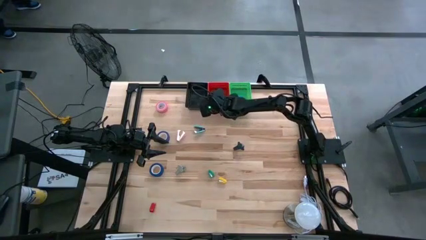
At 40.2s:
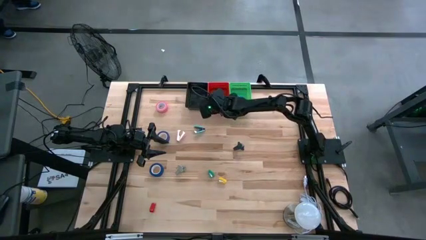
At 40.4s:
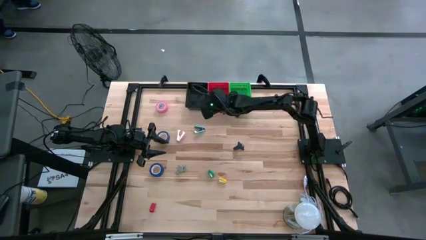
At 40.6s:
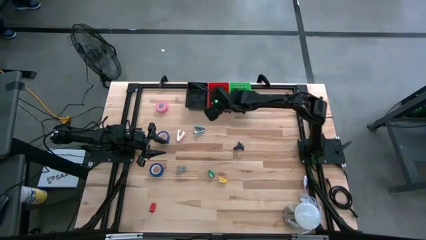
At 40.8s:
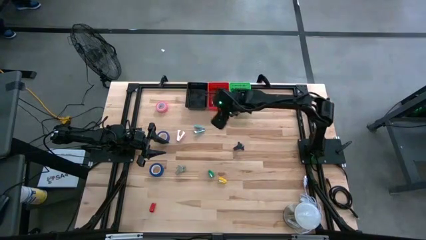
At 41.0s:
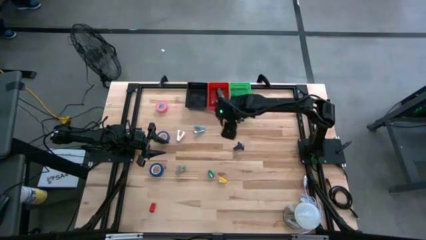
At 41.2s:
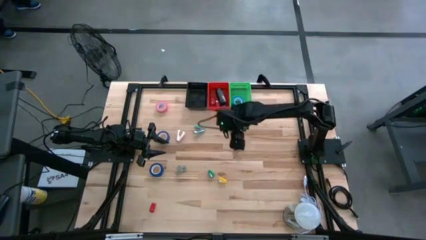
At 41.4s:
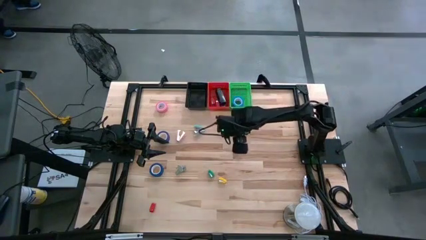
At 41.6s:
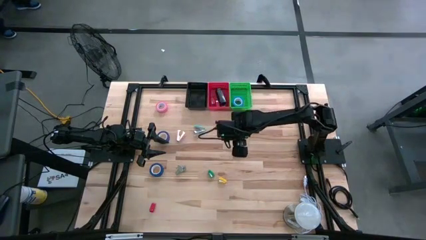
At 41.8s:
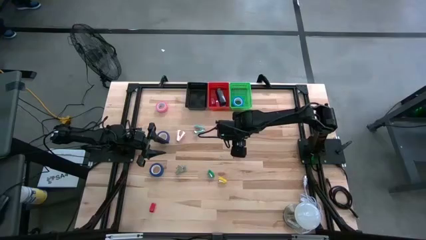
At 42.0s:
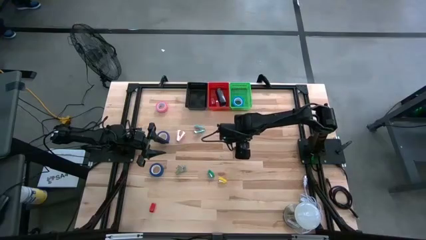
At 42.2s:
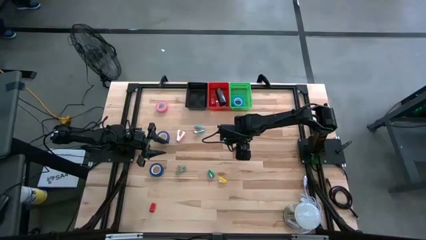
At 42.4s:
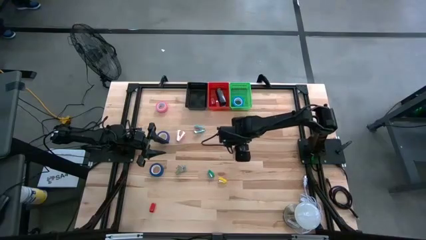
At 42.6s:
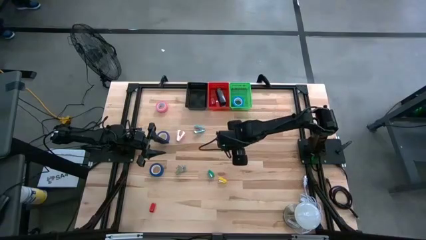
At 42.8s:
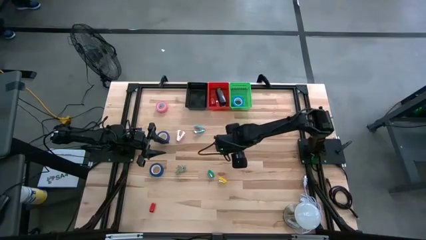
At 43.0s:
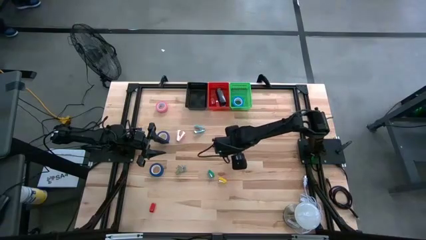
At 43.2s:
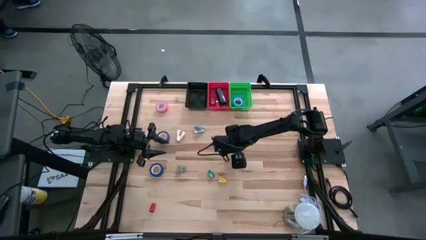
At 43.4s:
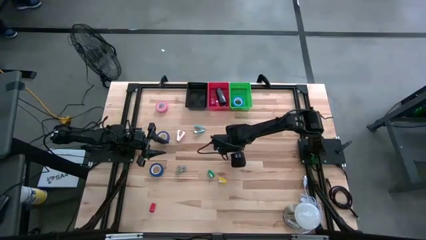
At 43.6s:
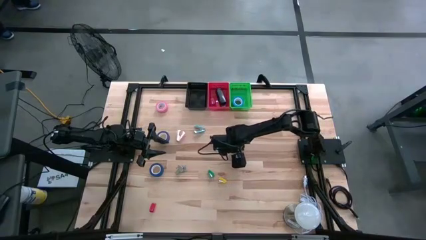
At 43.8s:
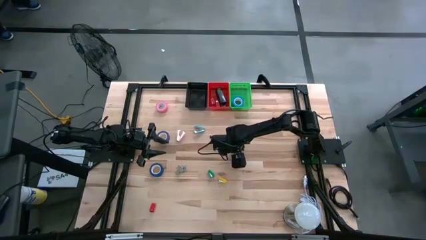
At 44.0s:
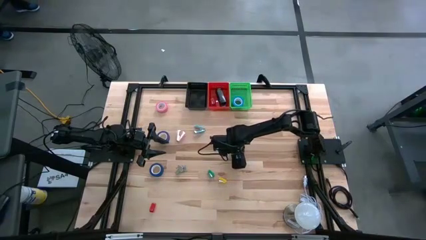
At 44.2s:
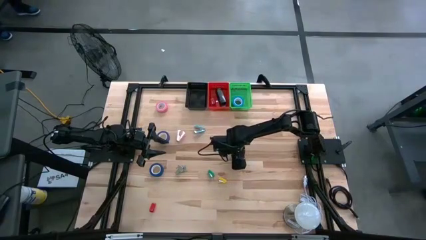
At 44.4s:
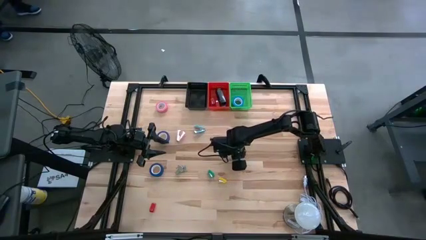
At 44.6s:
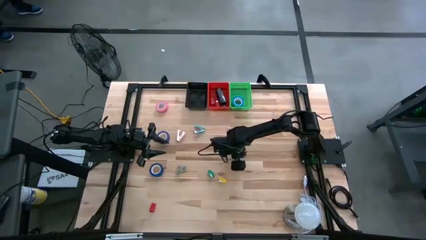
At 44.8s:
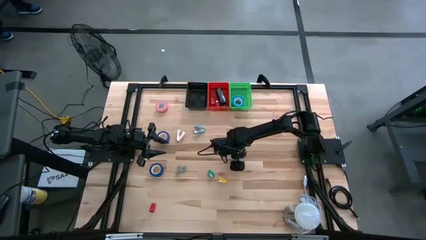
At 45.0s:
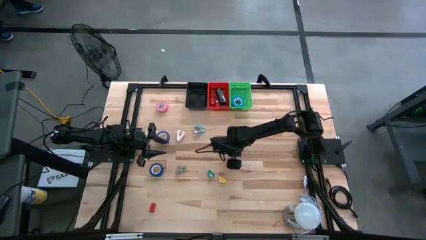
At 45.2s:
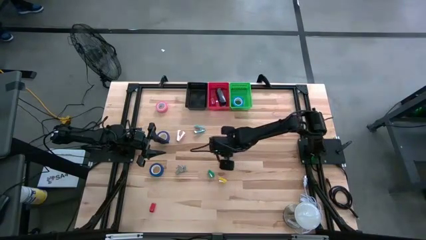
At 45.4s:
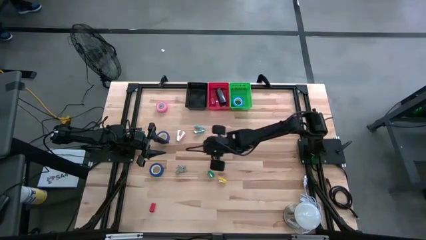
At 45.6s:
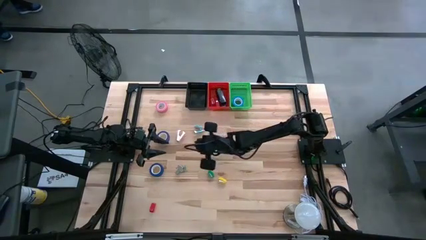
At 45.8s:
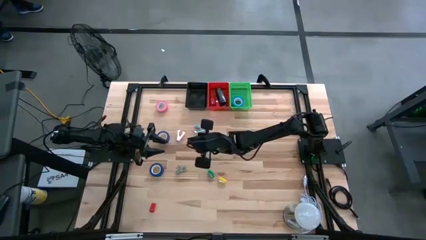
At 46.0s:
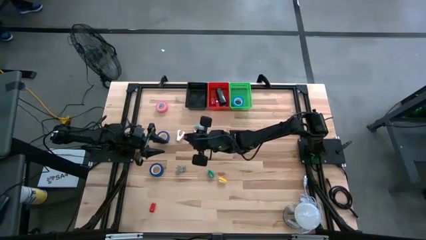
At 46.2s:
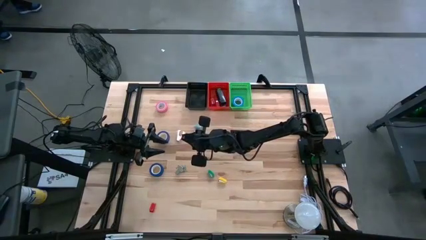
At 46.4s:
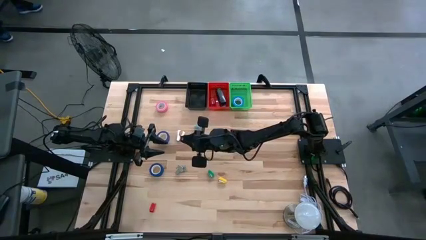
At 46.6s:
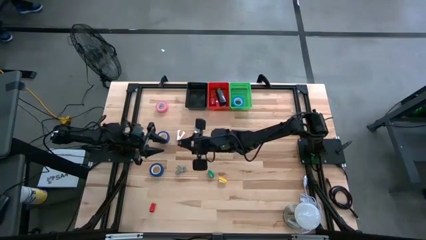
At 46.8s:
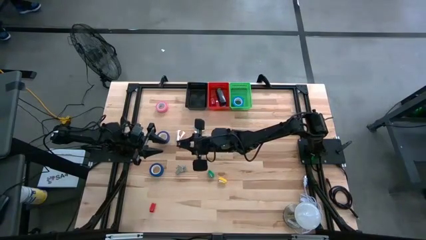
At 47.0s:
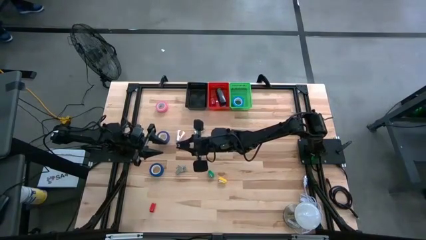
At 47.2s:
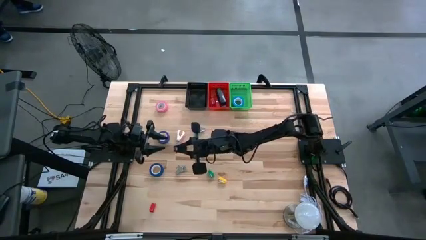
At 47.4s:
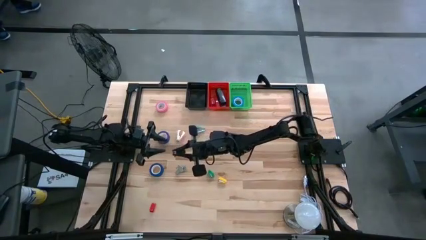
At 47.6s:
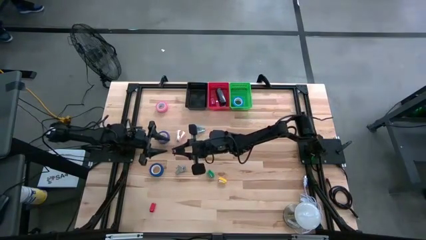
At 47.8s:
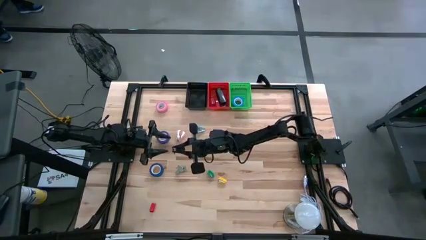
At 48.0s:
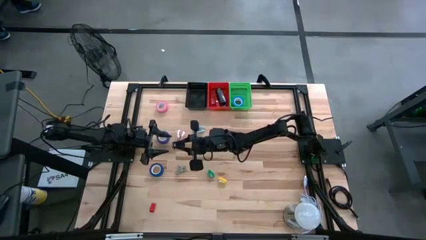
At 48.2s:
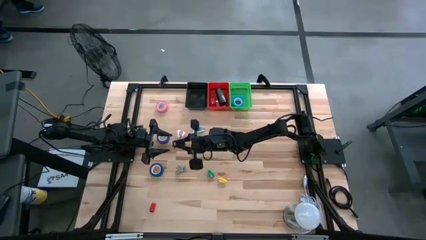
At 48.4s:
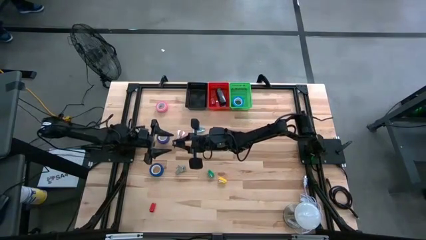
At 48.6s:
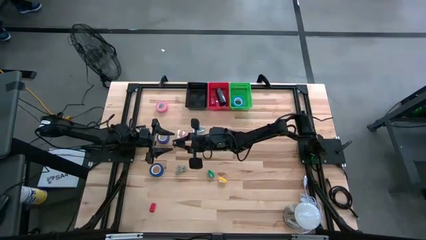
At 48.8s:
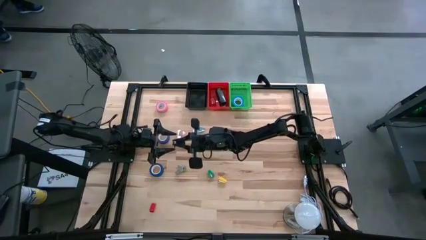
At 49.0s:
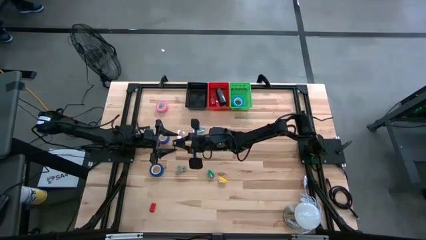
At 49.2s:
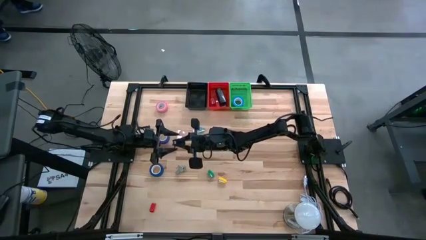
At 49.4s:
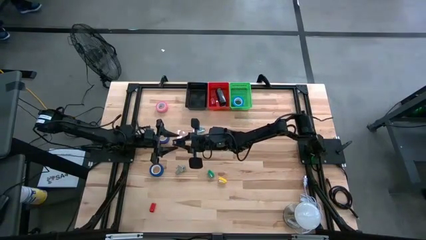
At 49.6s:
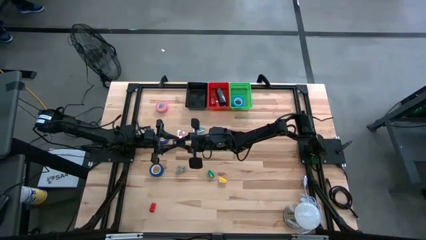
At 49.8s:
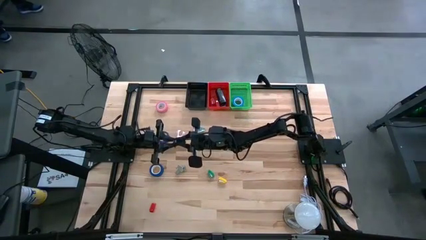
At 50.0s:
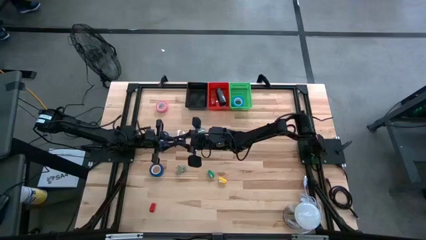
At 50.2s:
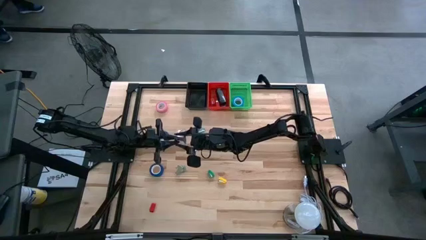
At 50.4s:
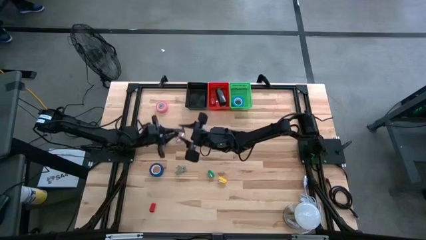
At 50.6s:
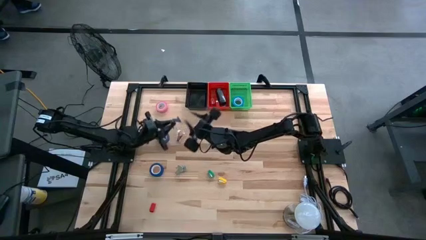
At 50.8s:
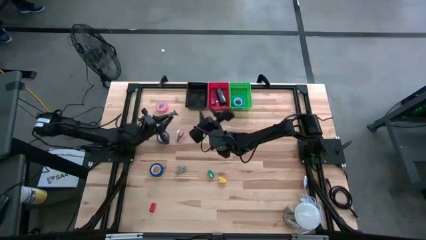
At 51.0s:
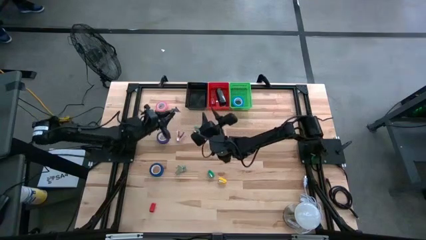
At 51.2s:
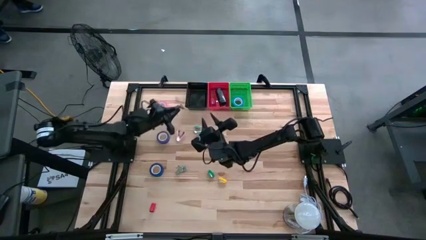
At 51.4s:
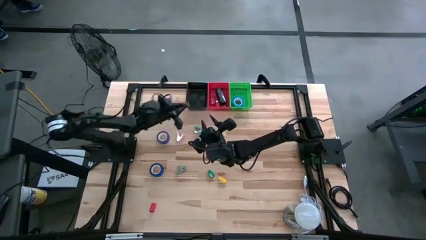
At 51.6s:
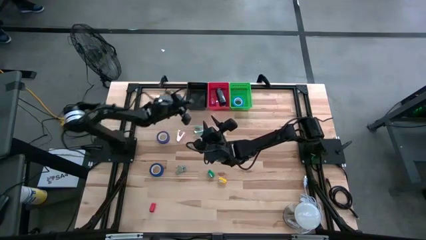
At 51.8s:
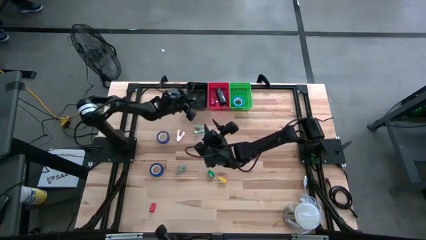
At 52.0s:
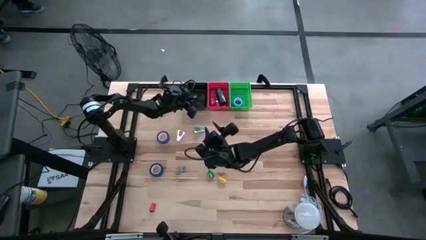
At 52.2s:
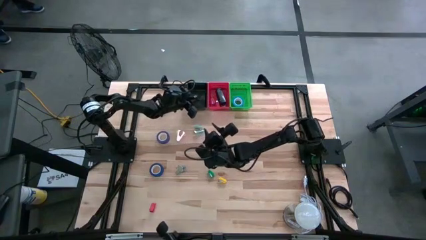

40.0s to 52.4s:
Task: Pick and place Stapler, Stapler remover, tape
Put the black staple remover into the black bin

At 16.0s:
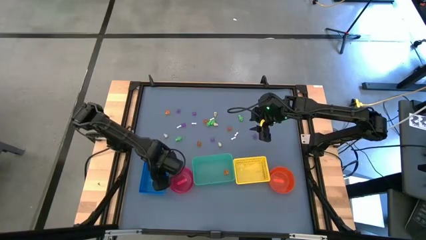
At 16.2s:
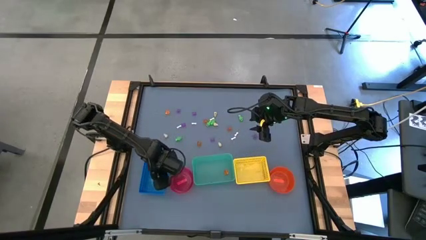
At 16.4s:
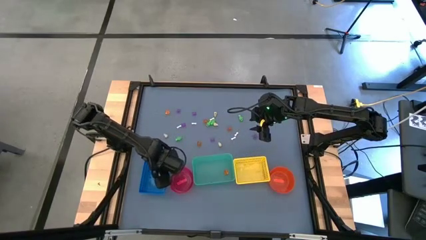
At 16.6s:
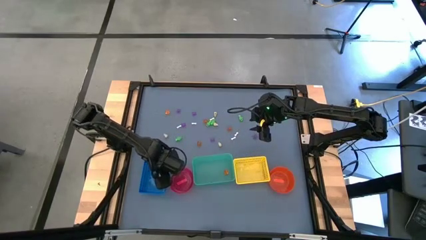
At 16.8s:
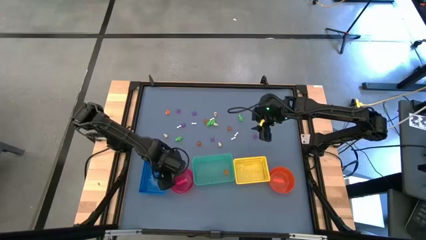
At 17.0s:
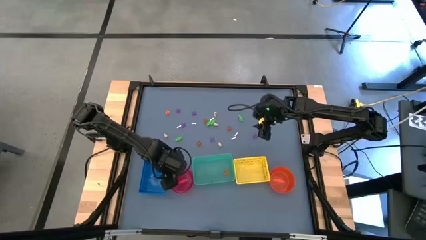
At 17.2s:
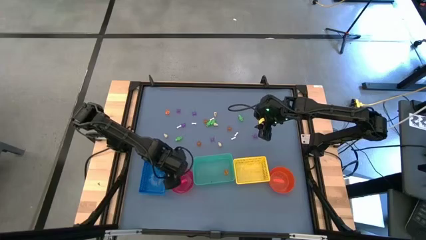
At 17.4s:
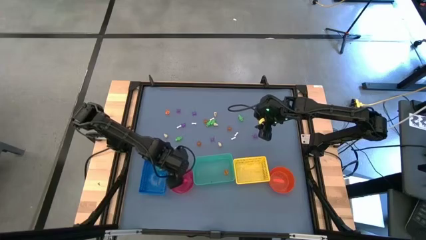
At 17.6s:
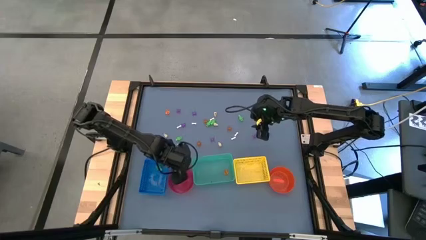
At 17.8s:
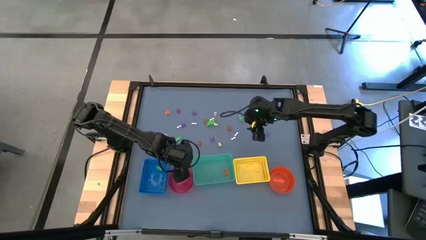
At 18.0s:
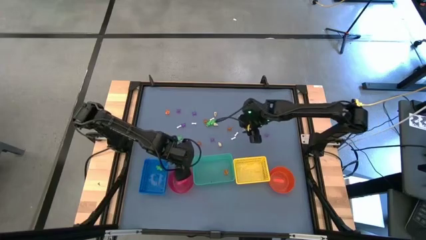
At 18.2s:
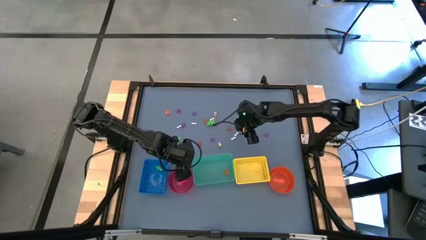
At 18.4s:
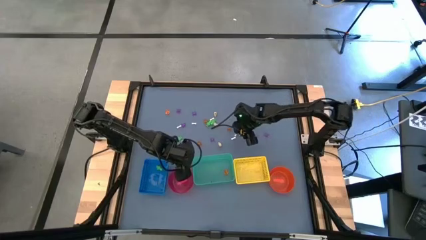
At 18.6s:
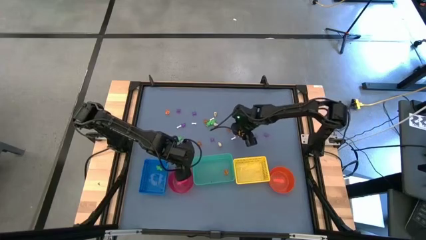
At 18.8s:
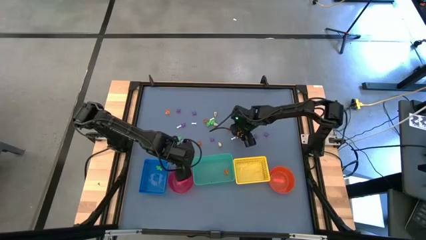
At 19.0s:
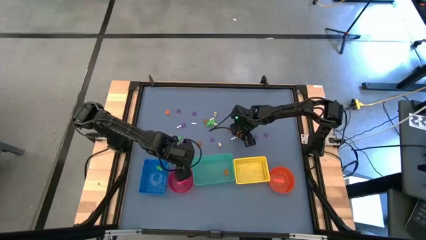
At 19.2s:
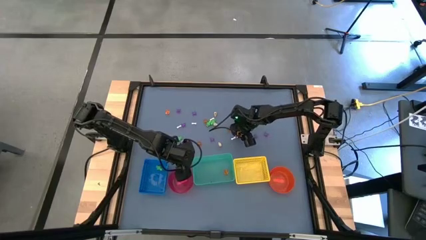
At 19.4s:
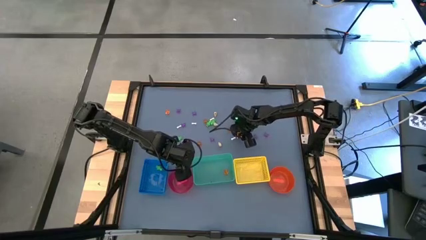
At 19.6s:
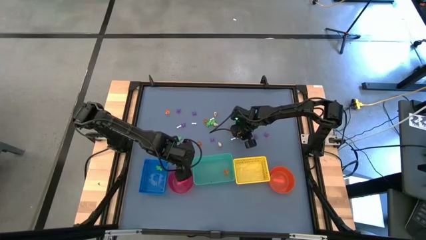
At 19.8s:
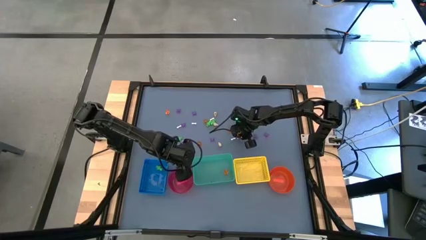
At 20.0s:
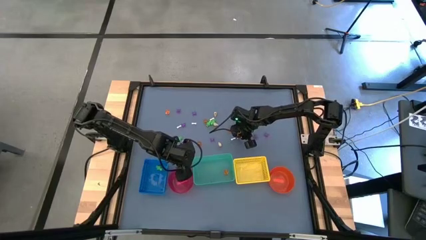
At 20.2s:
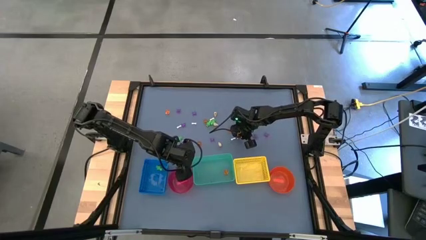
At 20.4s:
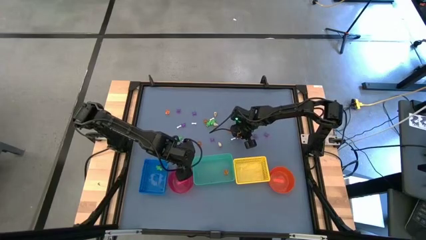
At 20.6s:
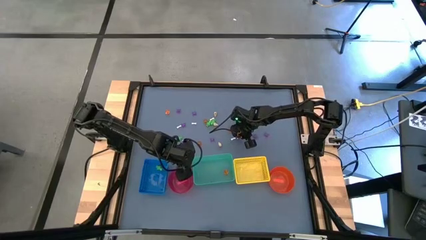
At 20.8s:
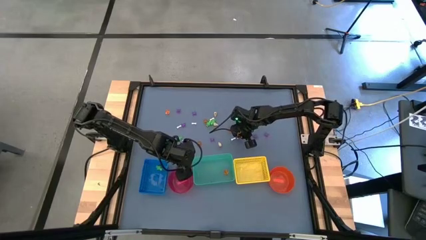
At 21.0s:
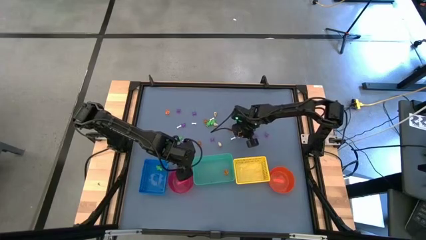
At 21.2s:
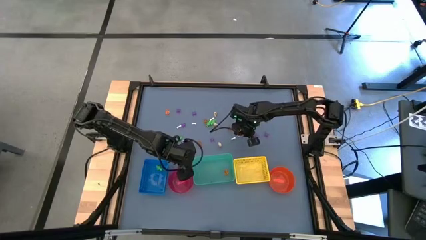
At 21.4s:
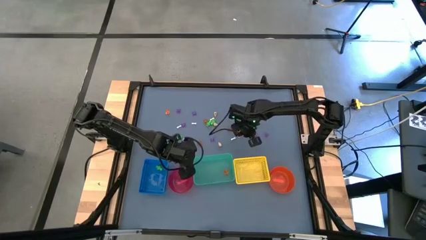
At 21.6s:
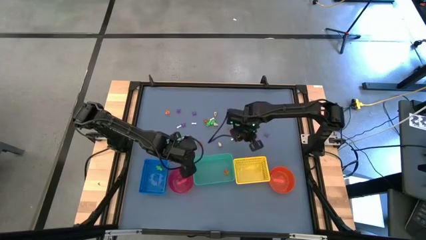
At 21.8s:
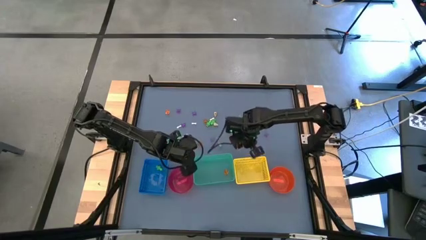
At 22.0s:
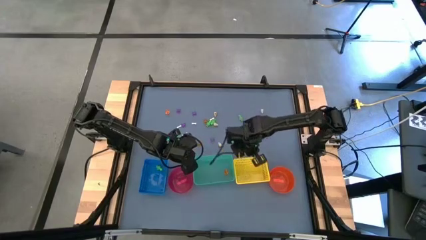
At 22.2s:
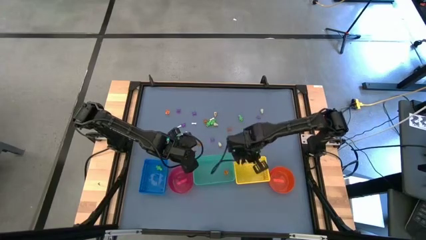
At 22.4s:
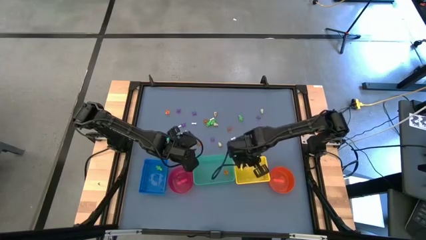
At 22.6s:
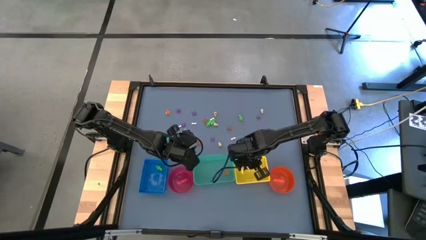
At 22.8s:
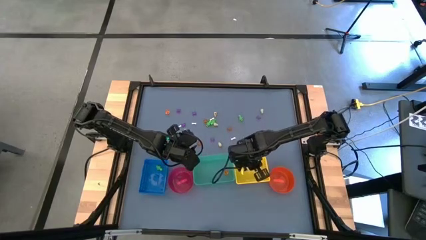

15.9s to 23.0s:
Task: Sort Halloween decoration
Put the white bone toy into the yellow bin
